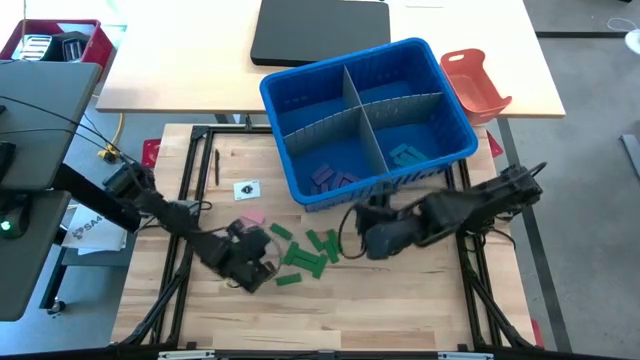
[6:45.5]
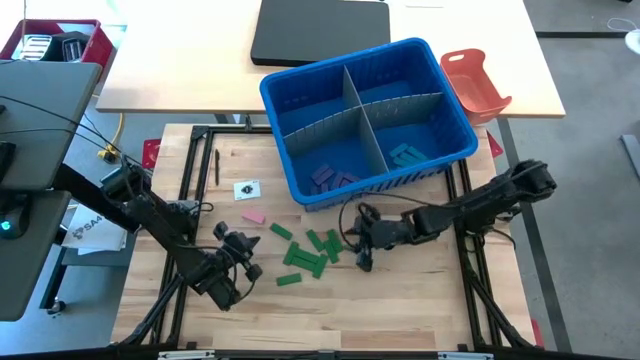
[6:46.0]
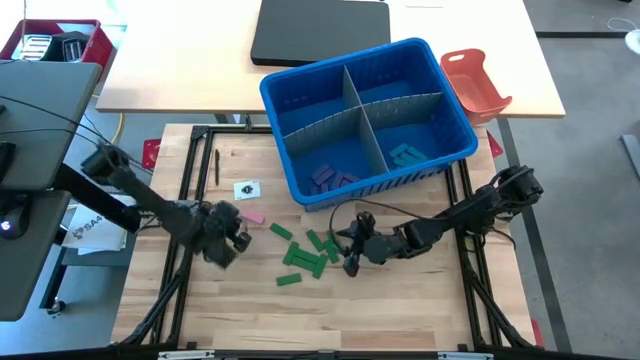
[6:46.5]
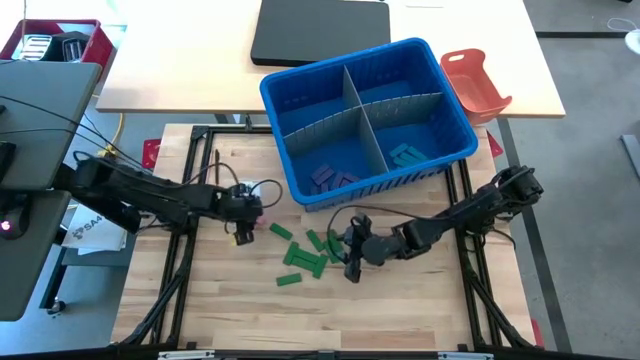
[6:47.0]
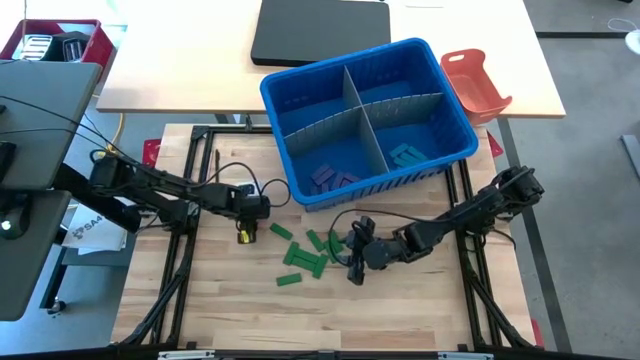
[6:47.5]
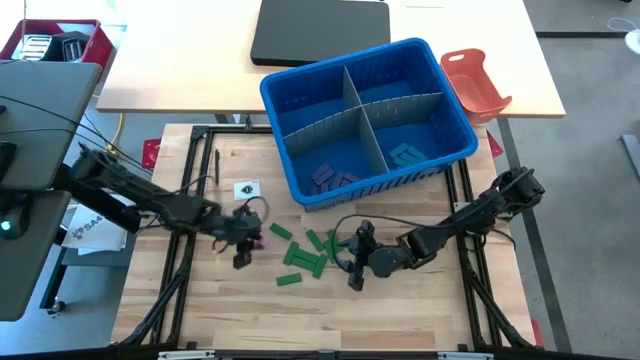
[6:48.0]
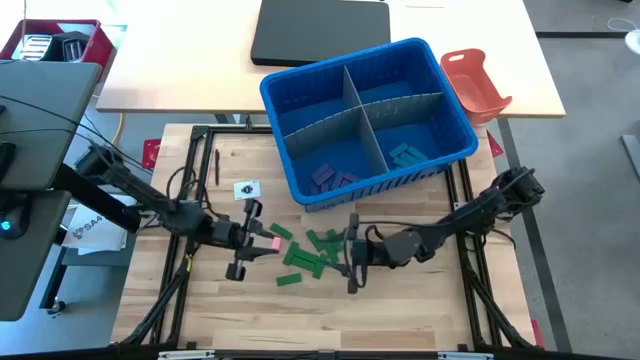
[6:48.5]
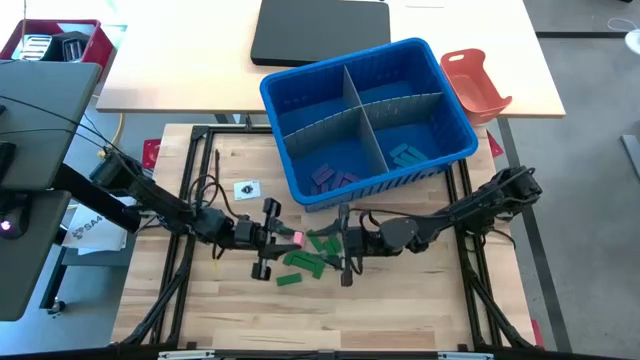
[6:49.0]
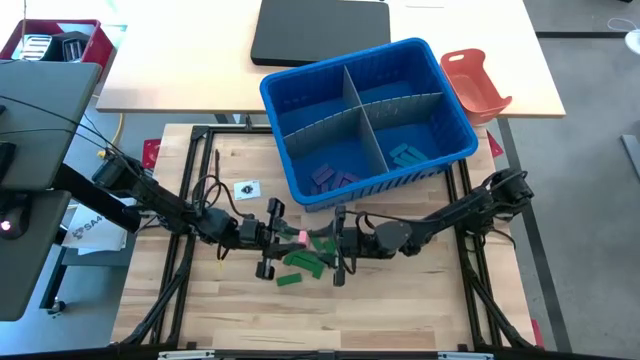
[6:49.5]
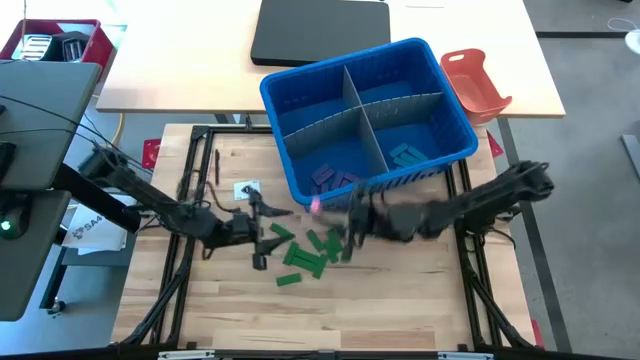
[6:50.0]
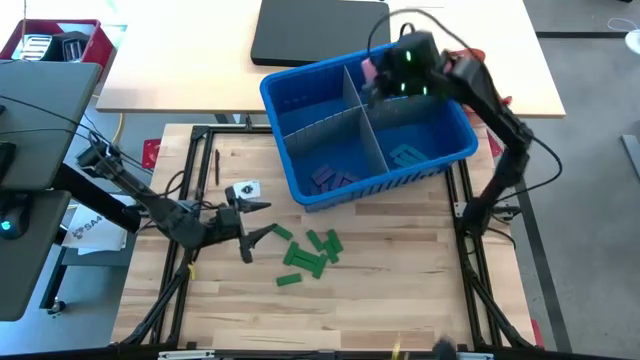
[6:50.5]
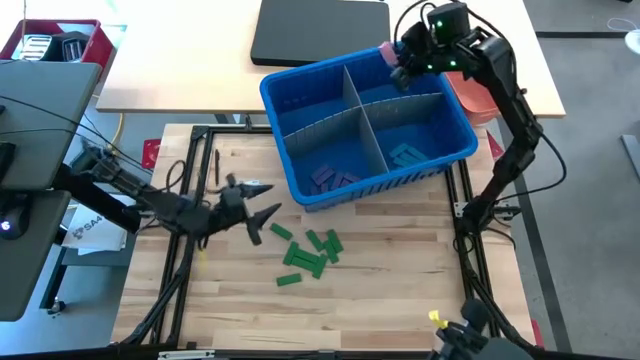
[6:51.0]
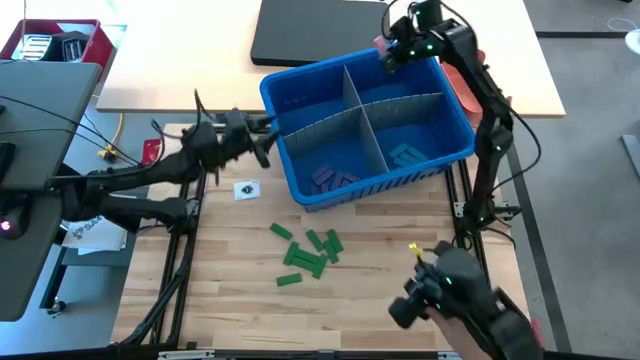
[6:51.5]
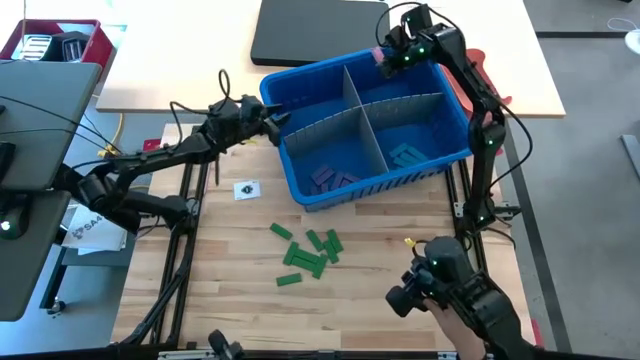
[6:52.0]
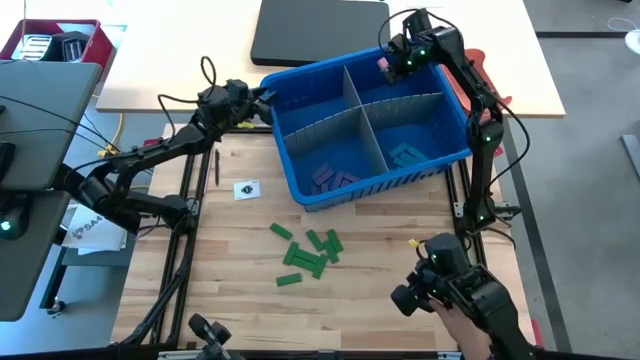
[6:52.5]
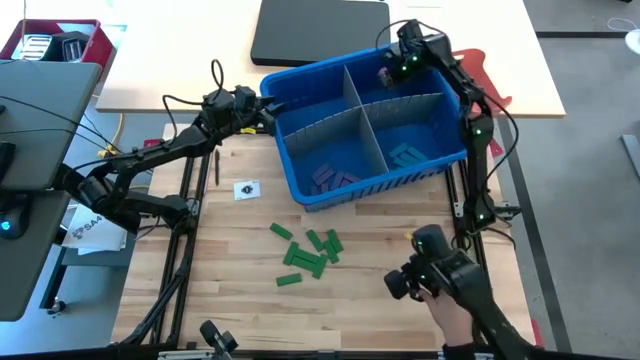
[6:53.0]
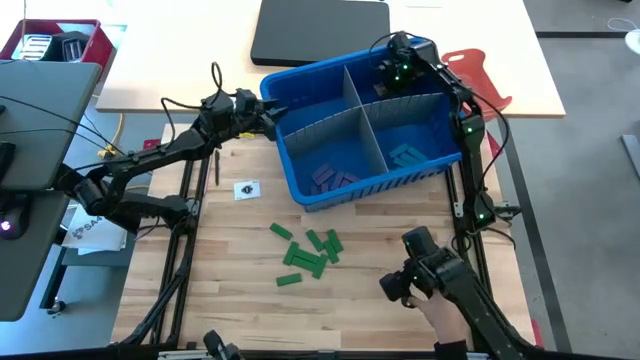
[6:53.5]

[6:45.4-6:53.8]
Task: Sort blocks
Put the pink block into the blue bin with the other pink block

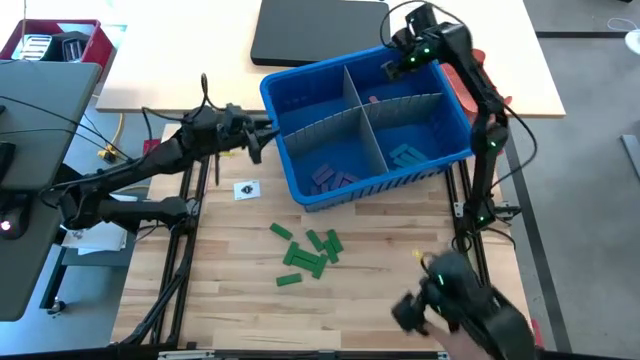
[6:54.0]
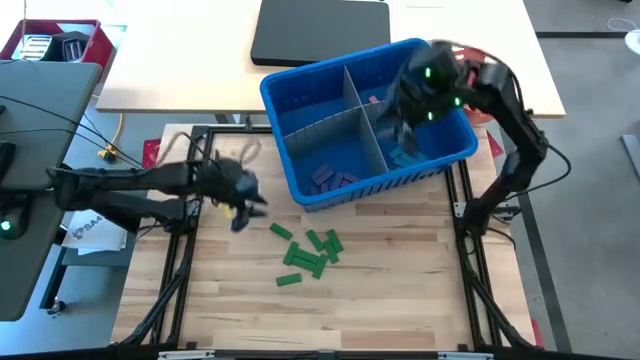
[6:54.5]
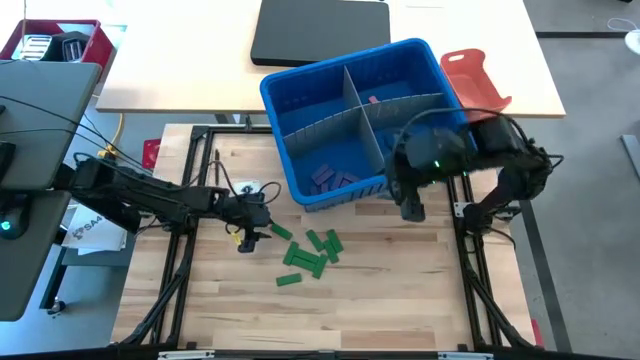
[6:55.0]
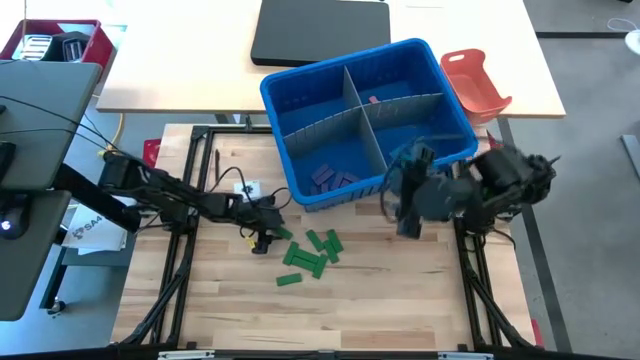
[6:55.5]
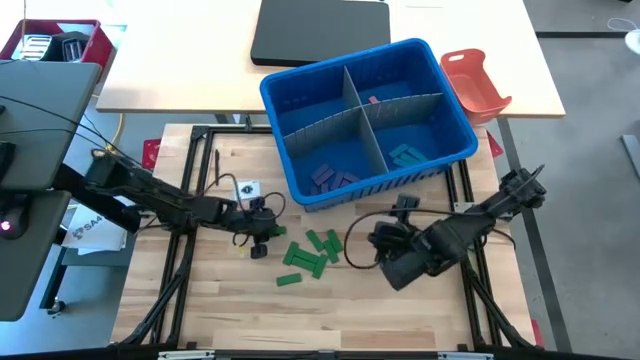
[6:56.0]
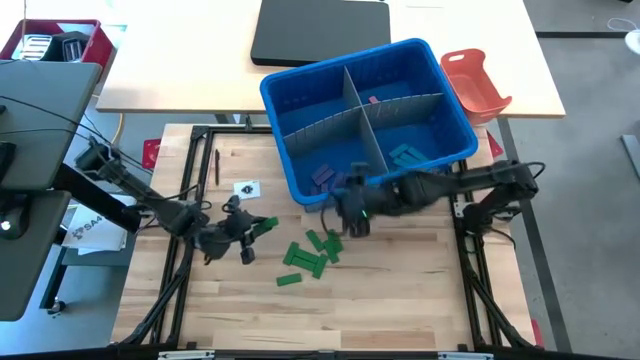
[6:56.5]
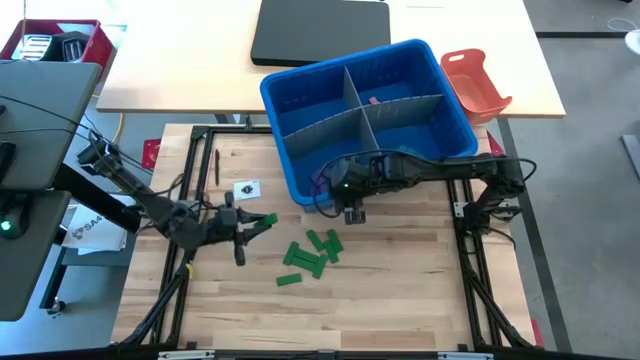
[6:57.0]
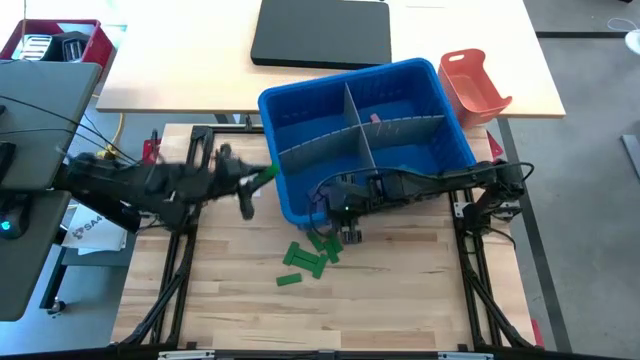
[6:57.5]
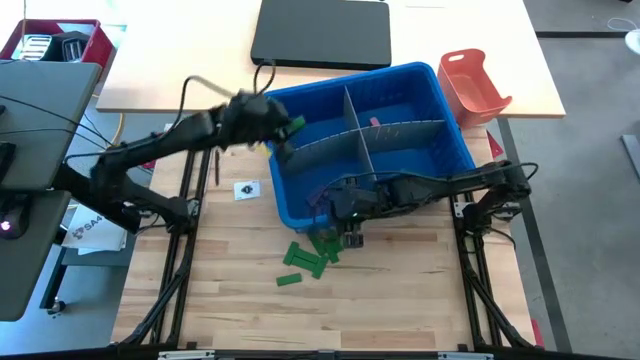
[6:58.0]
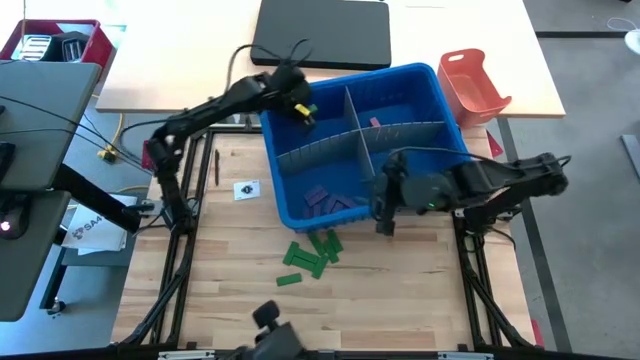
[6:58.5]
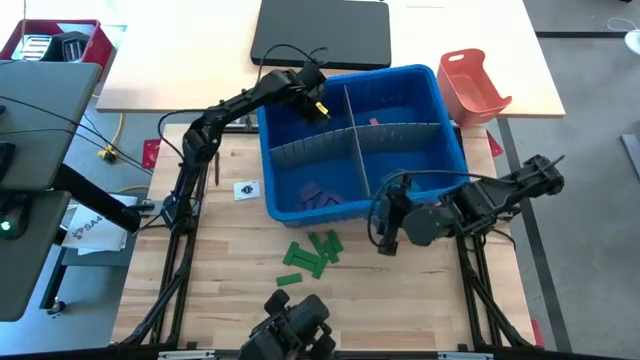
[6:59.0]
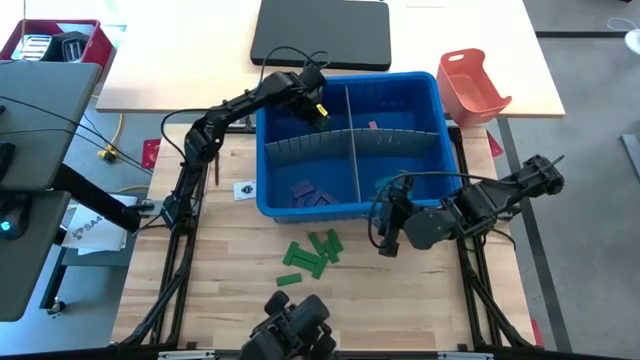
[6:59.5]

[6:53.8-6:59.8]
Put the green block into the blue bin

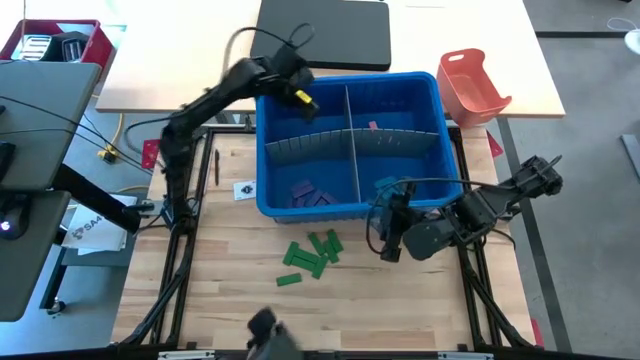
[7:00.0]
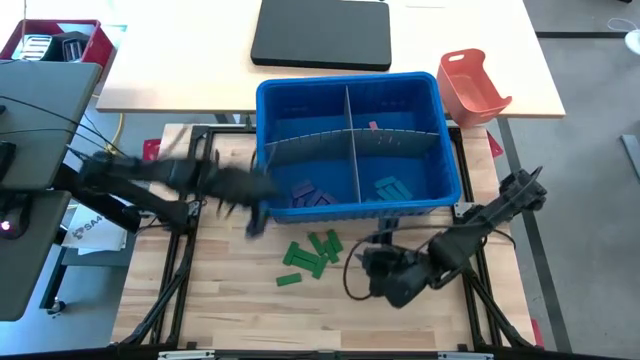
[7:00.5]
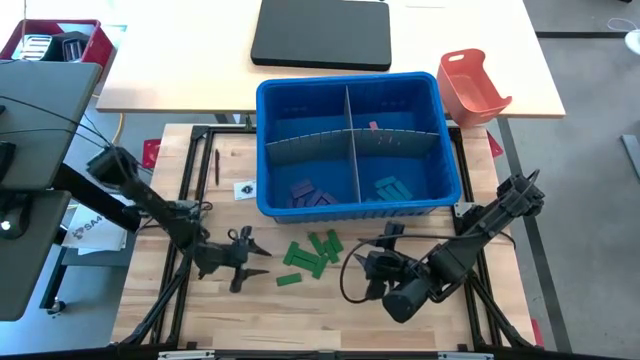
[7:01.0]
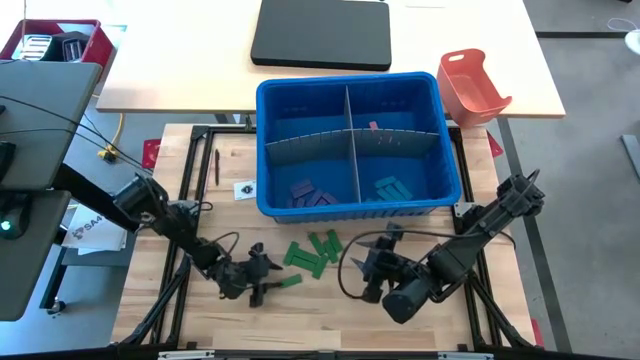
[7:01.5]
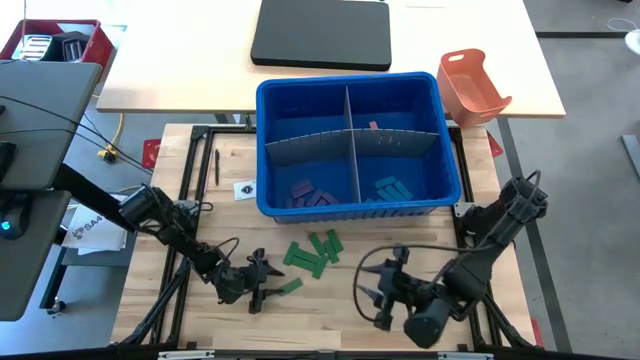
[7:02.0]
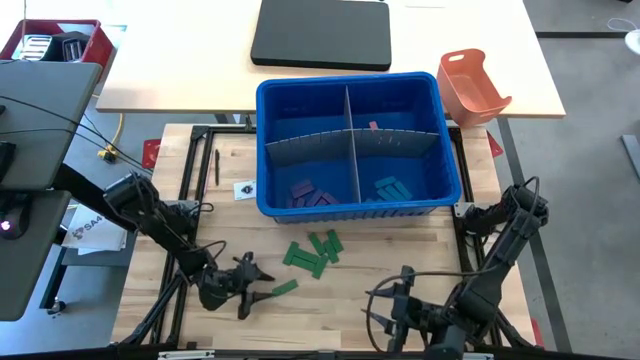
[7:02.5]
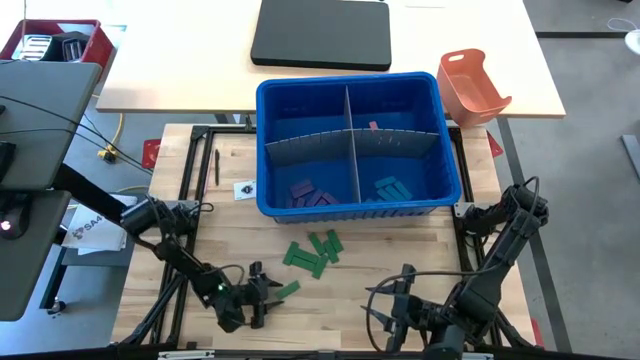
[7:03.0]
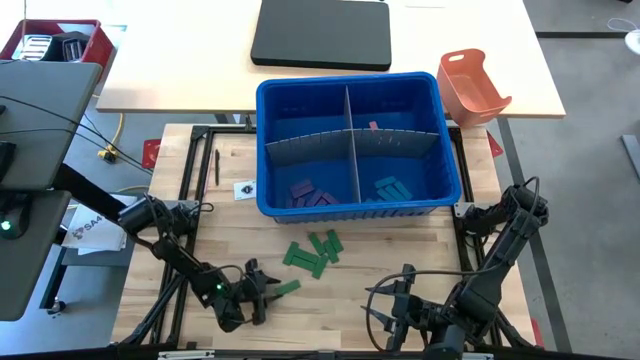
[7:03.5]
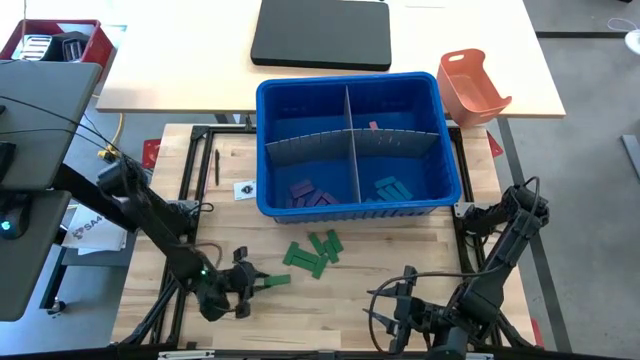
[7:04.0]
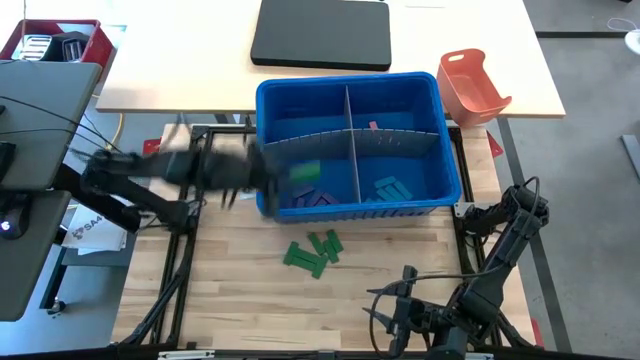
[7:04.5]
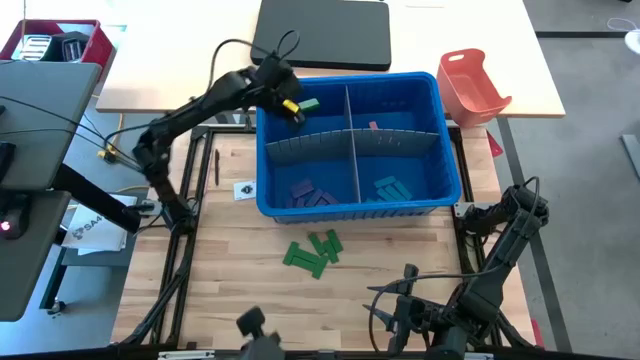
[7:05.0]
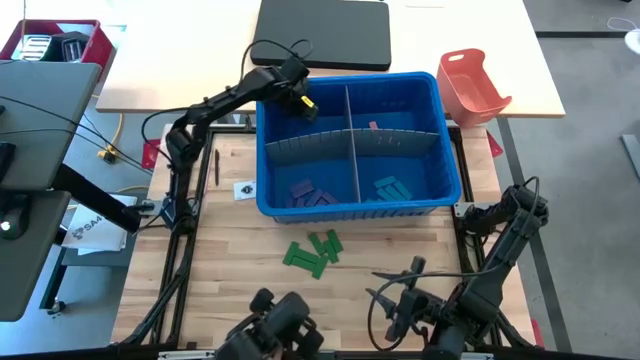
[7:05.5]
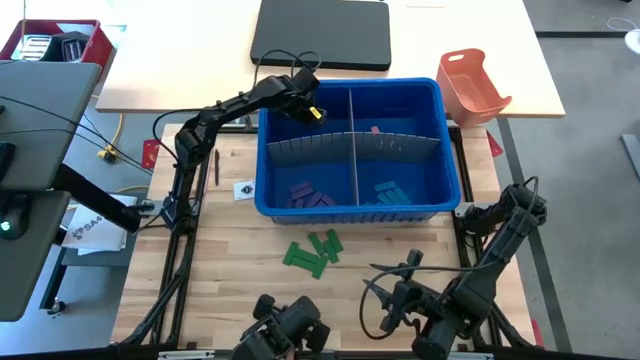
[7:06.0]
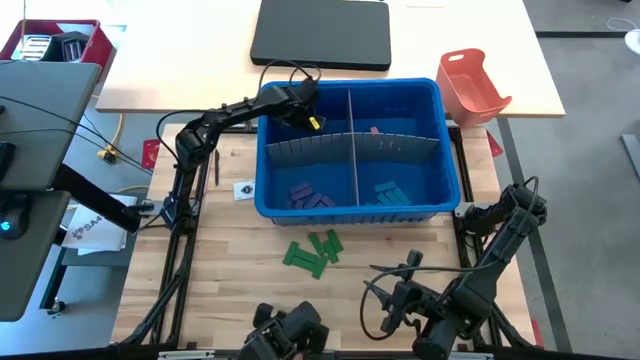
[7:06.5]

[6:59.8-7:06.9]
Put the green block into the blue bin with the other green block
